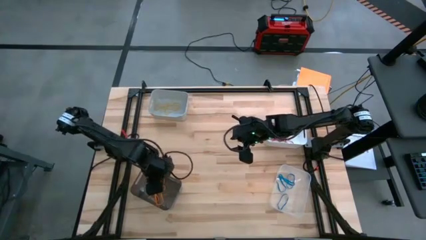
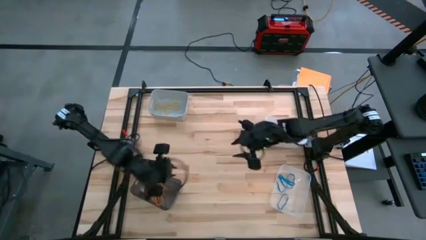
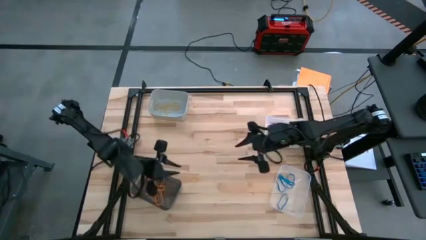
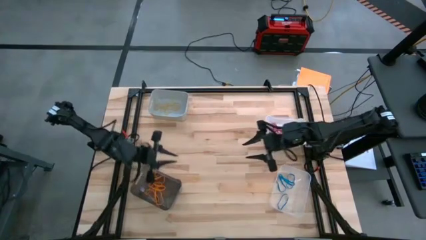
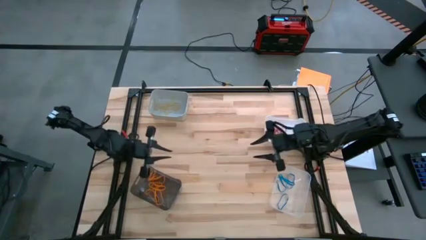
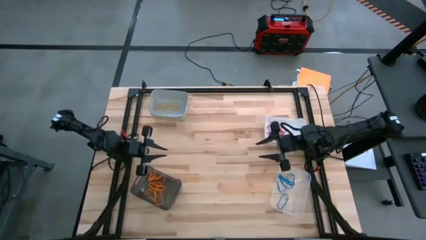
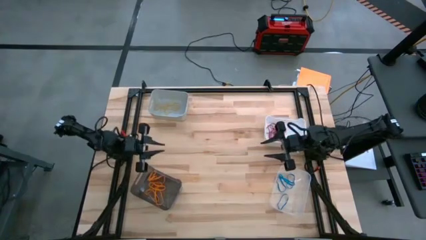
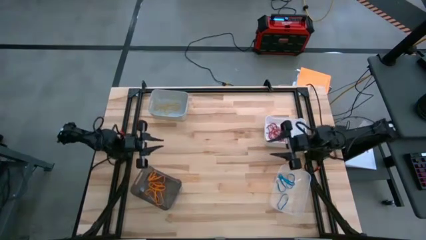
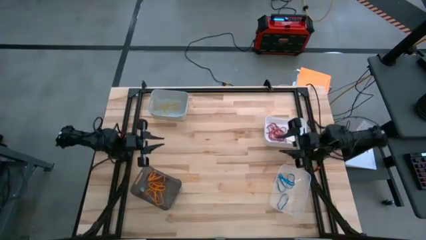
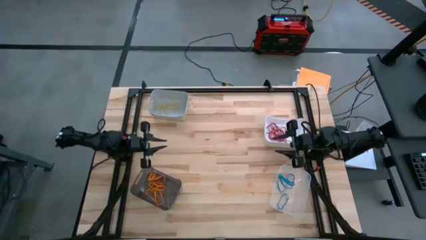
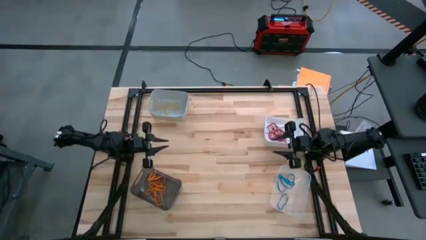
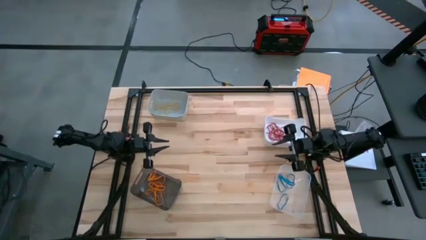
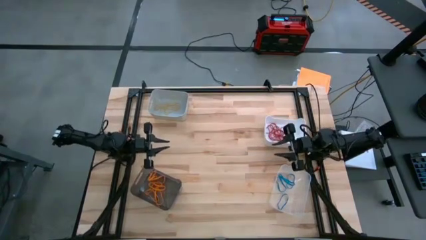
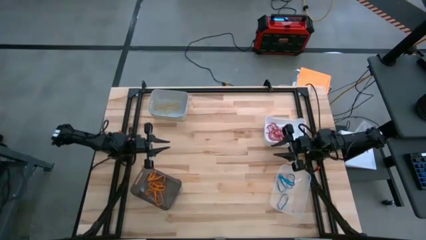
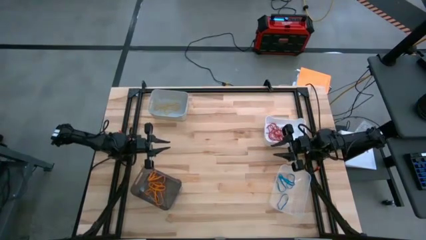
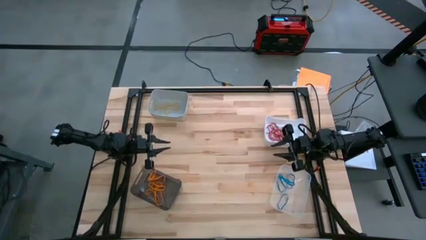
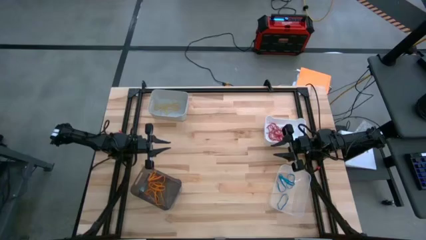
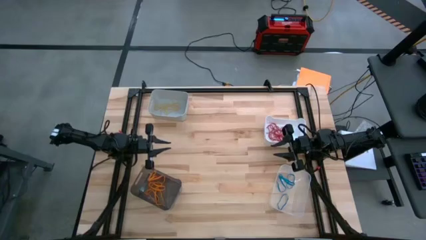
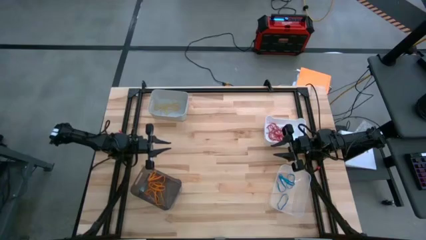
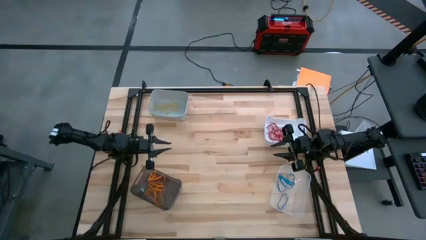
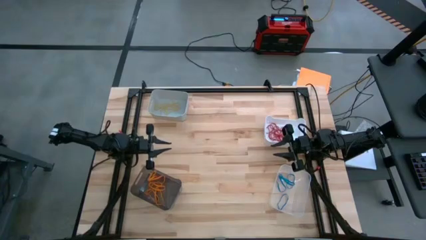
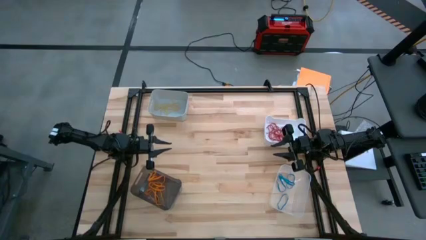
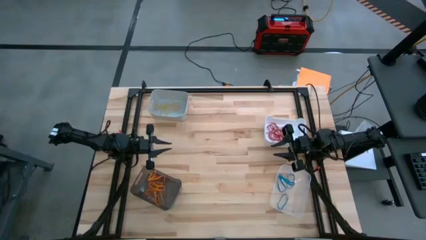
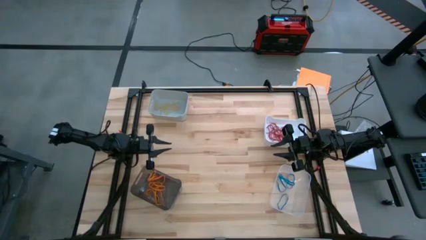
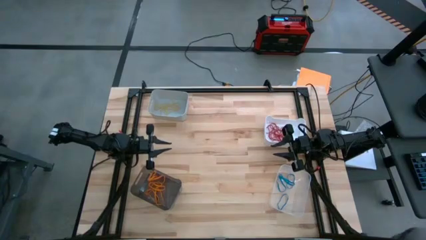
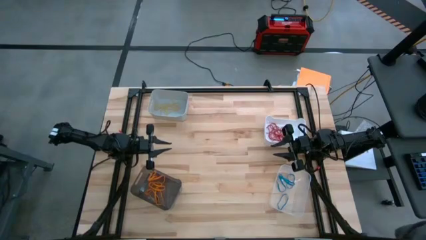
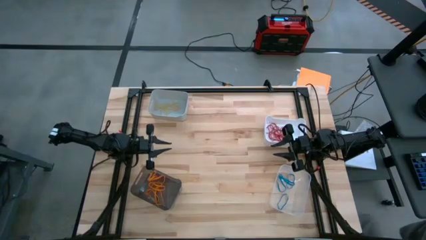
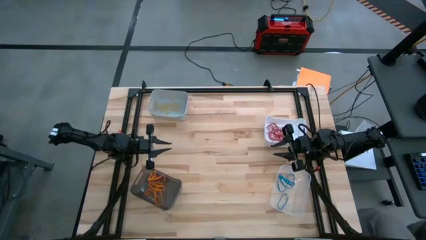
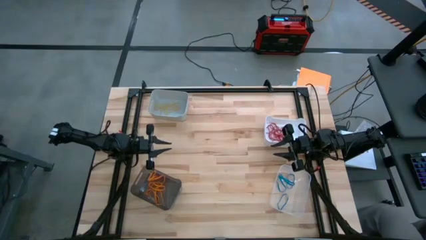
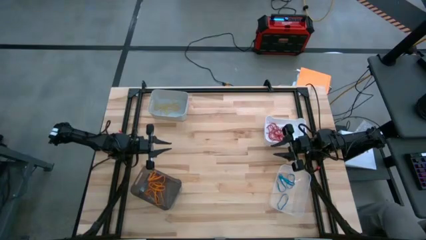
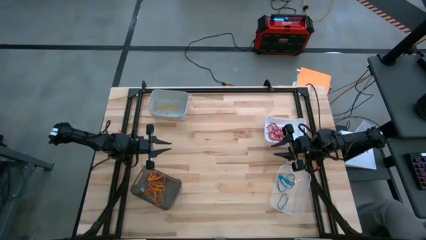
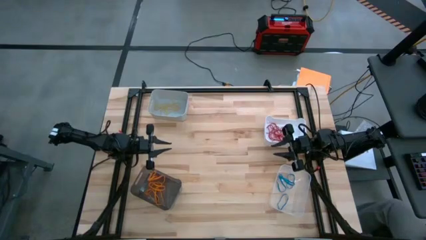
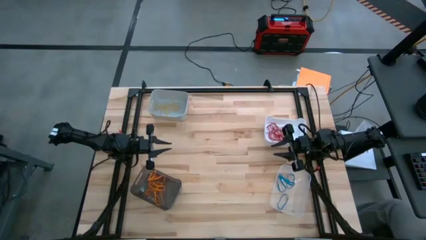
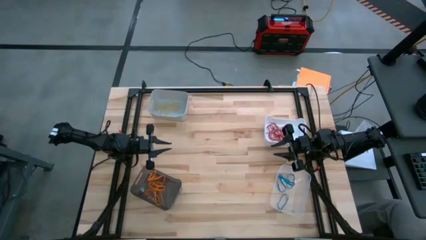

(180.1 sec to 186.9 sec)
Task: Sort rubber bands into baskets
Return to Home Position

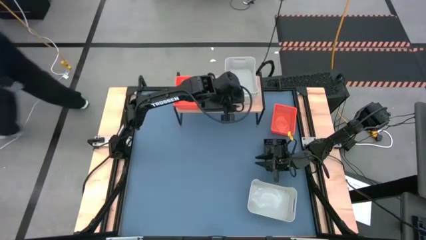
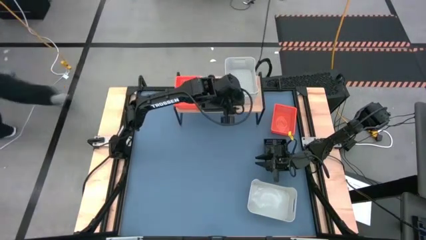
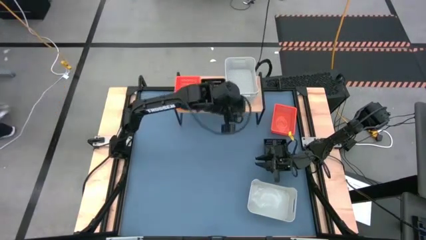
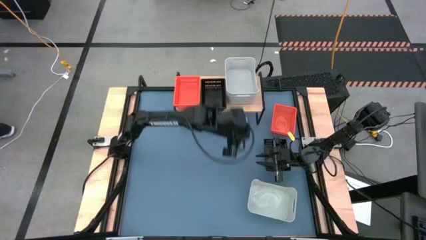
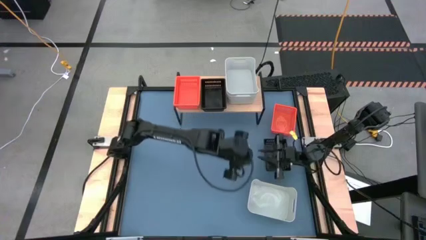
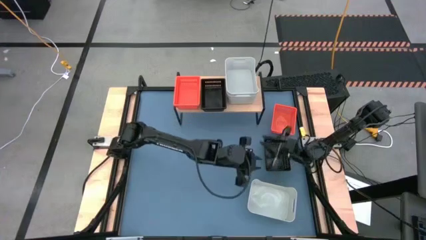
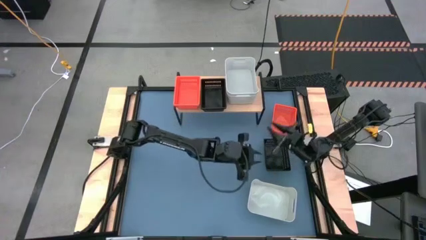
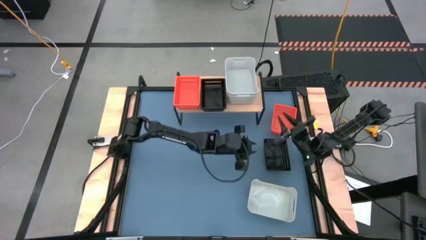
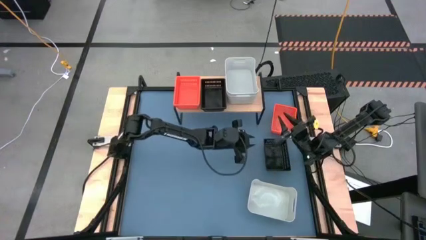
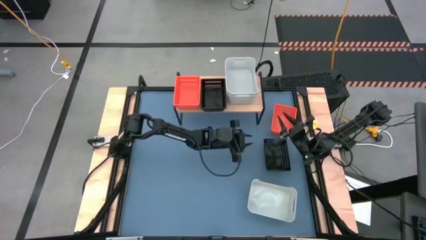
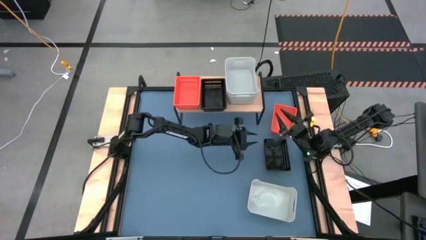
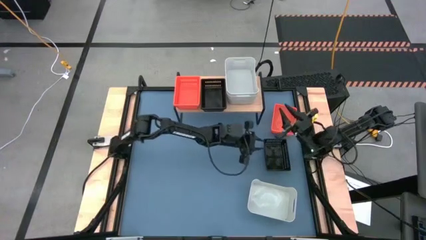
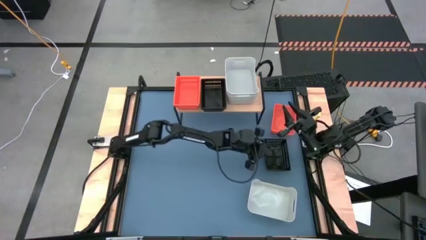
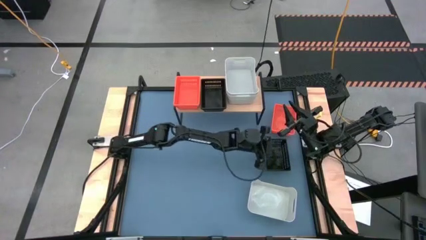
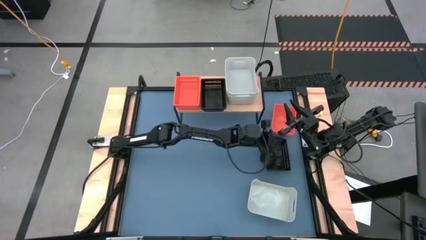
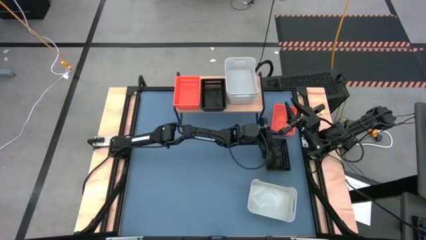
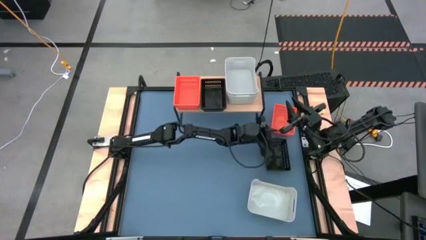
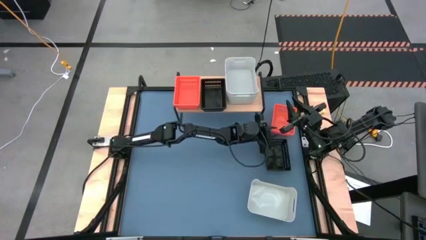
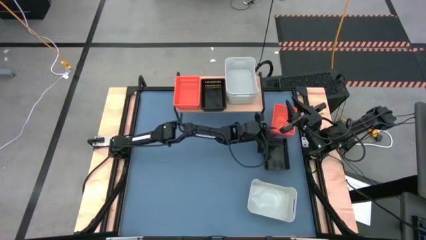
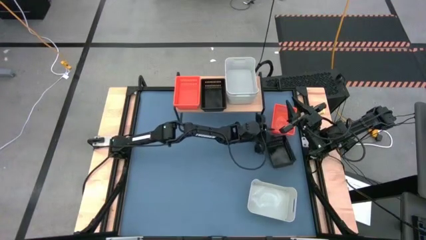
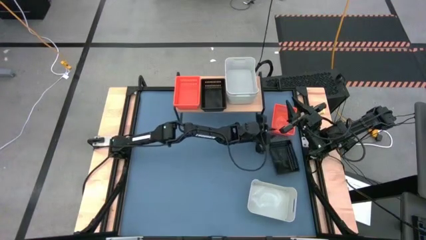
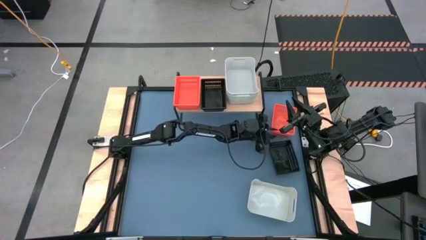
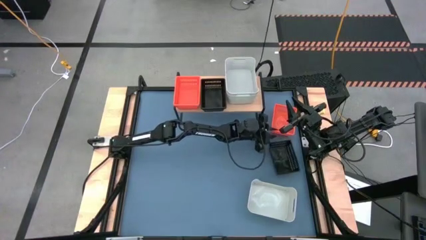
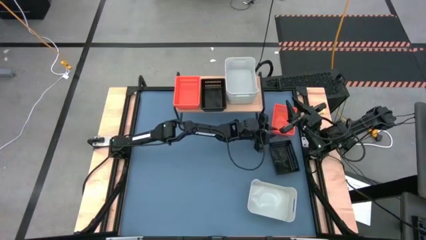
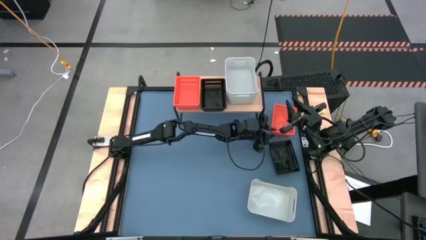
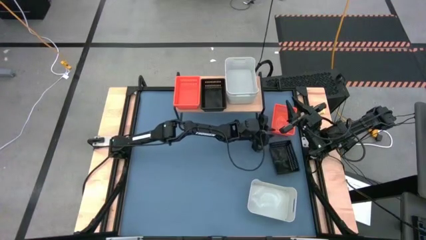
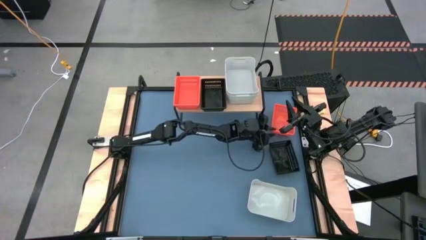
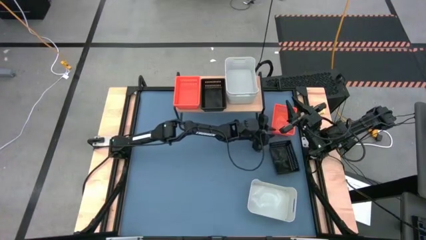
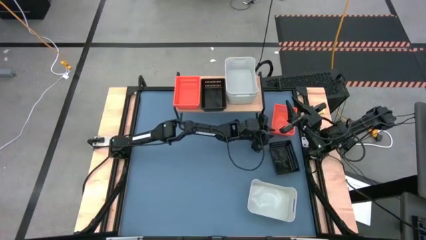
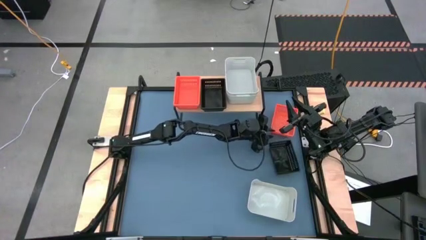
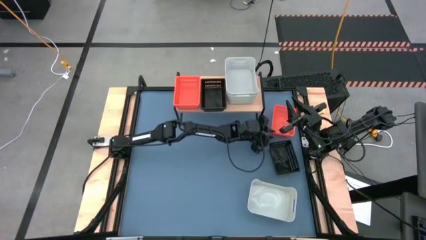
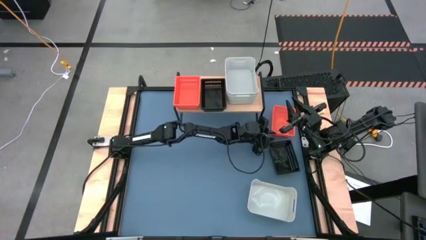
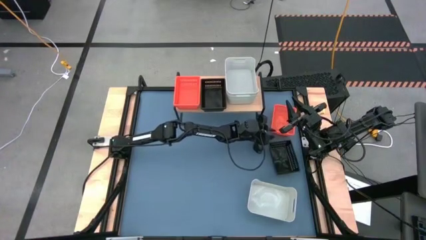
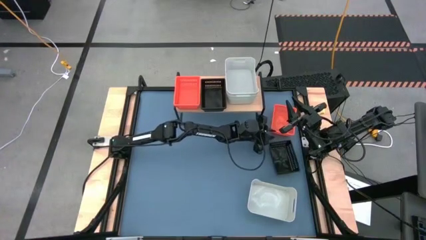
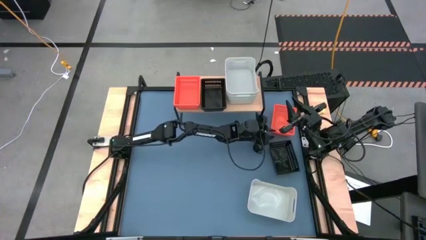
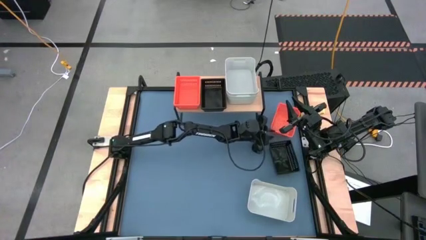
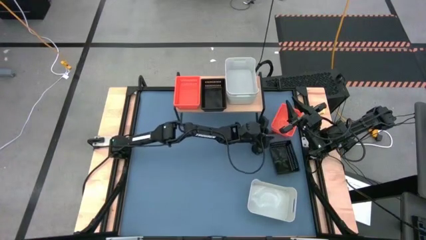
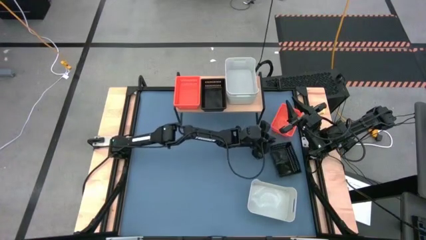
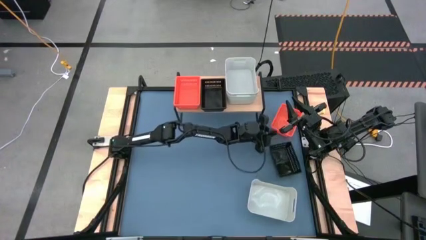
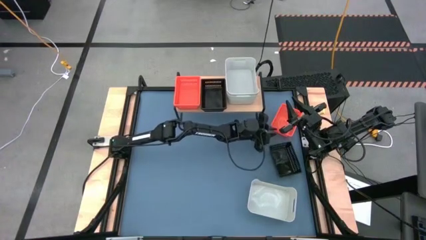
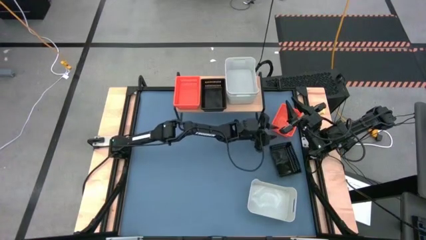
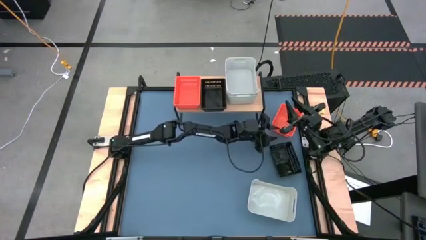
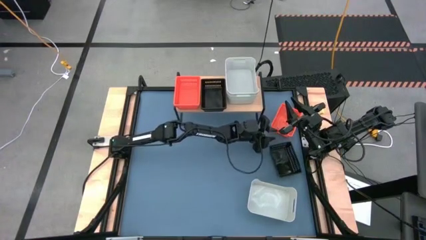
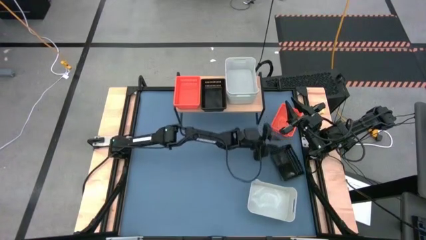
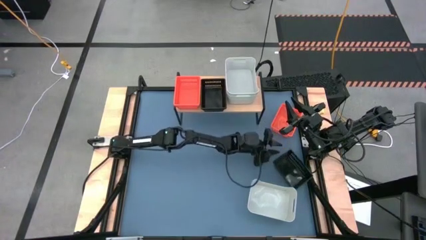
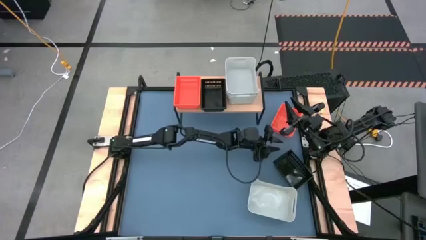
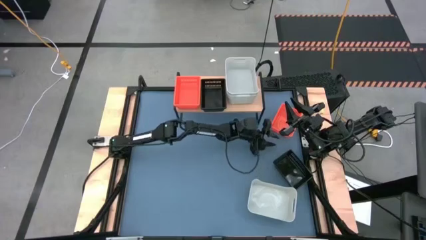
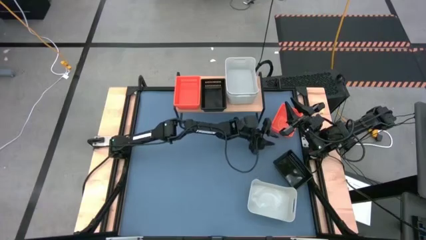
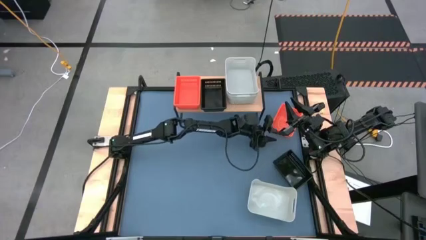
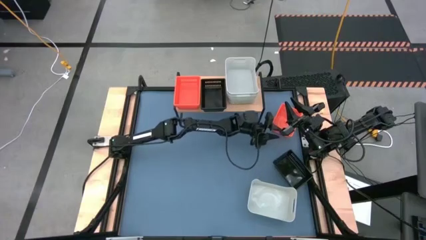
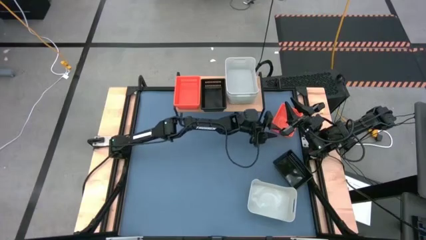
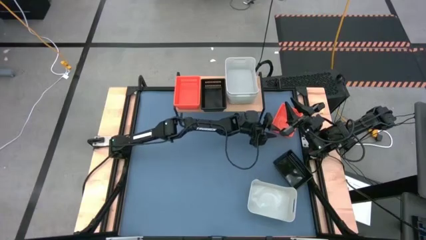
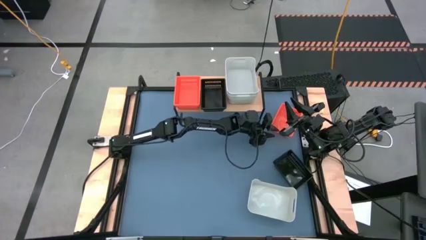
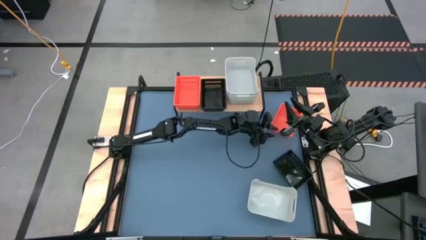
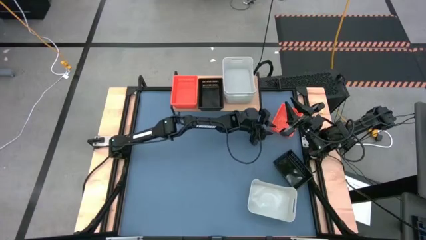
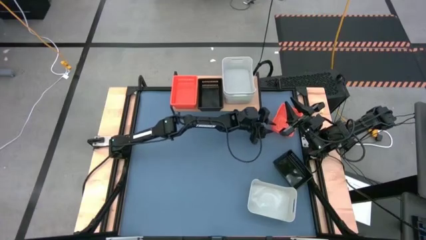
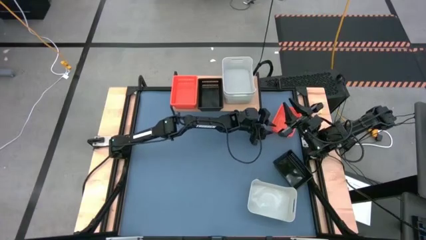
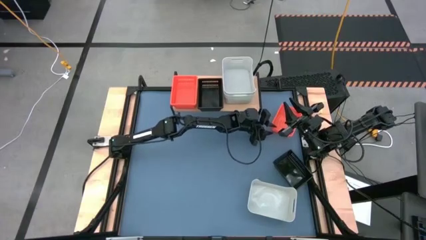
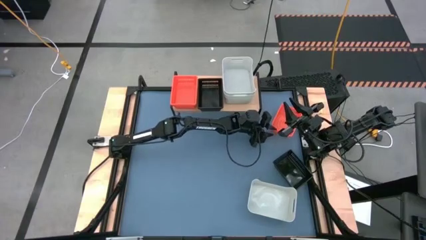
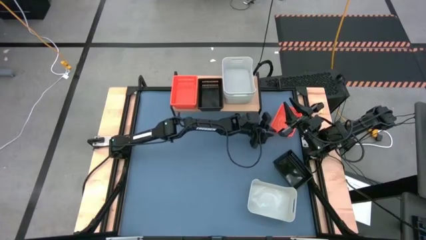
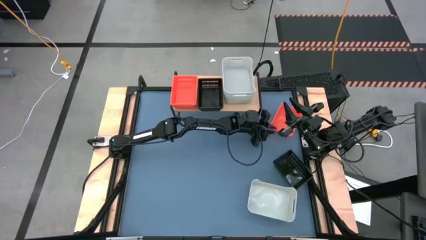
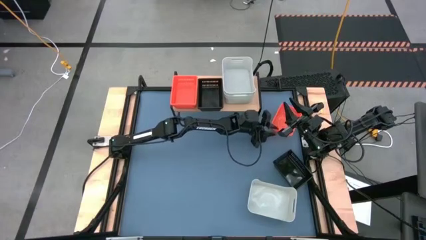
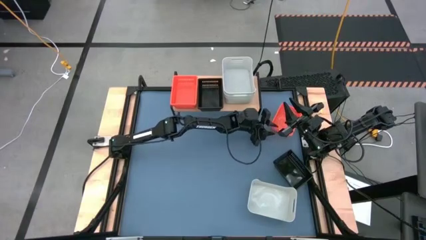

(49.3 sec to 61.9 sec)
Task: Stack baskets on shelf by color
Stack the orange bin on top of the other orange bins on the shelf
